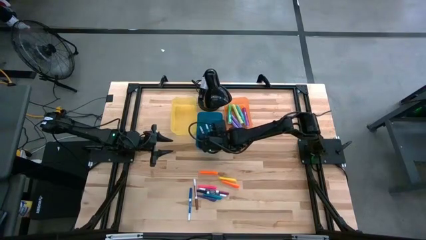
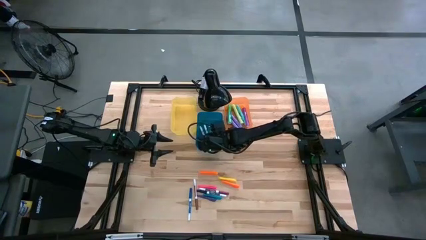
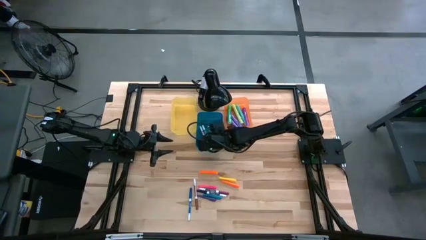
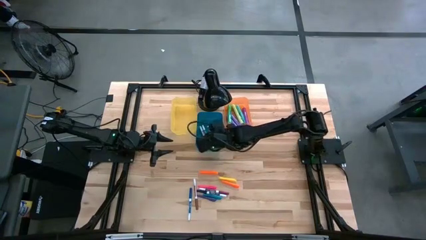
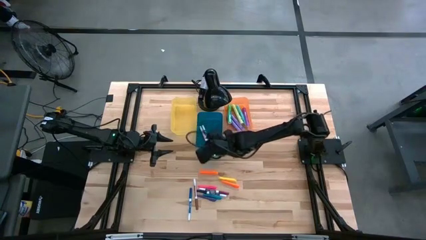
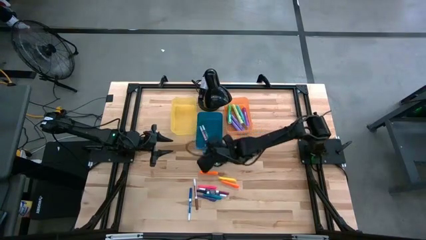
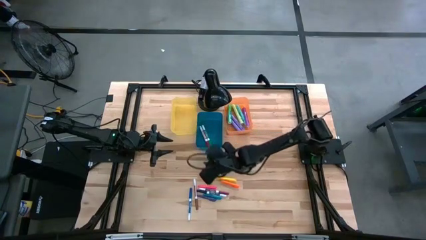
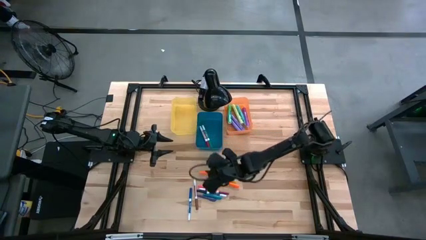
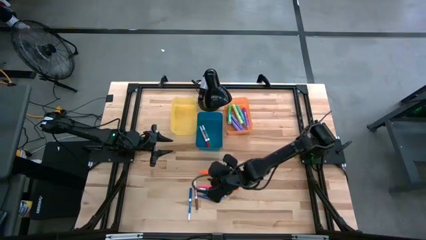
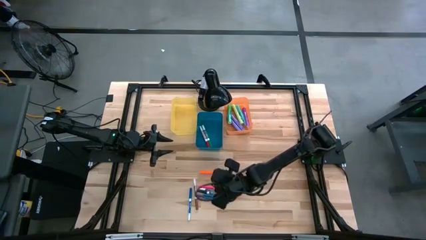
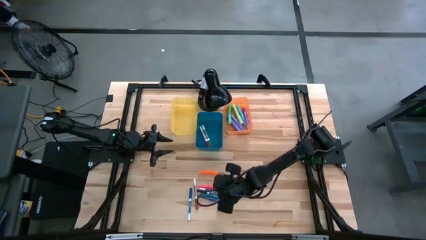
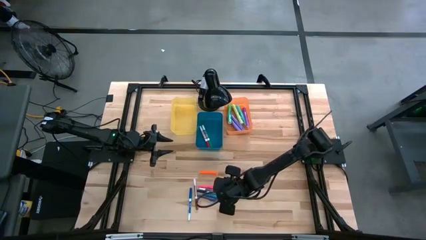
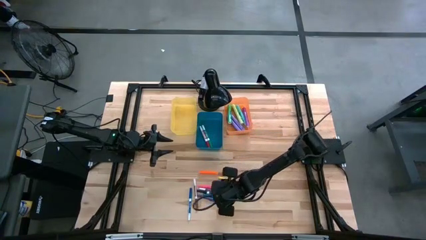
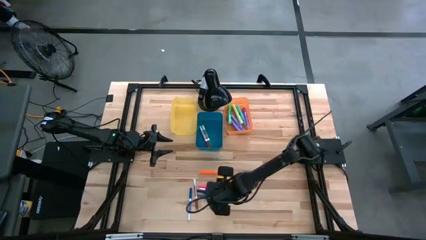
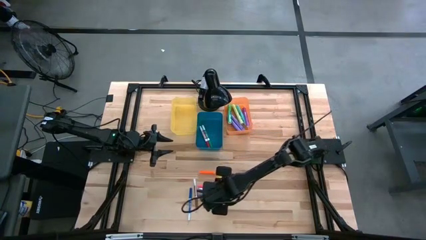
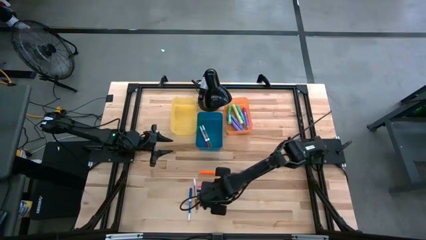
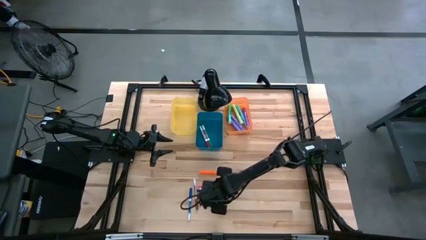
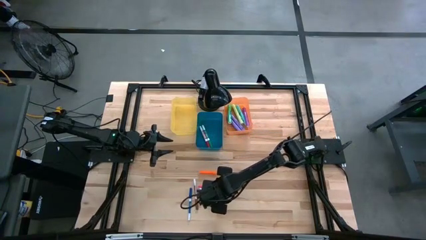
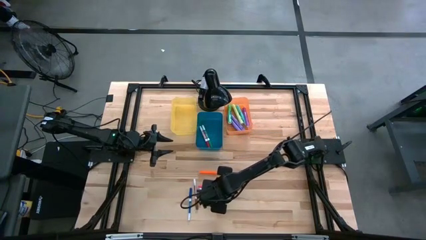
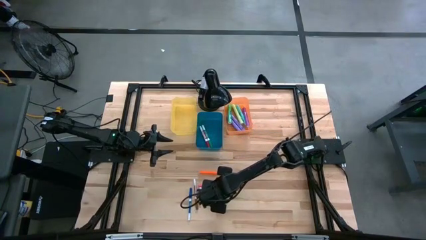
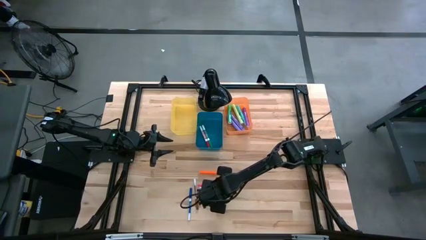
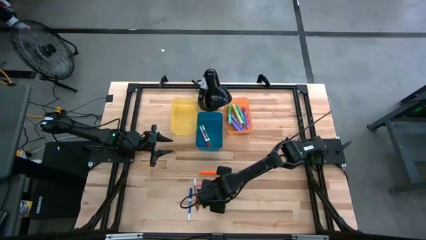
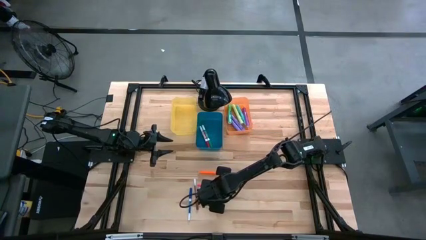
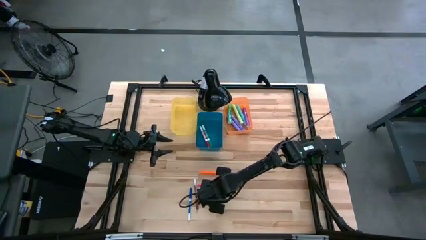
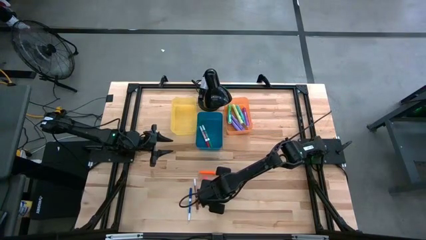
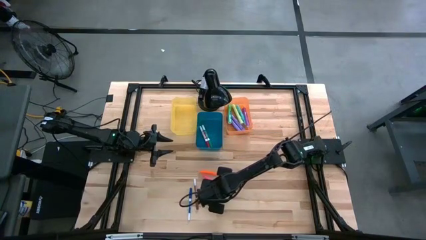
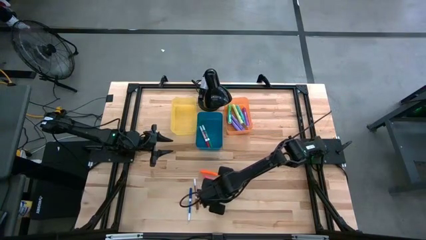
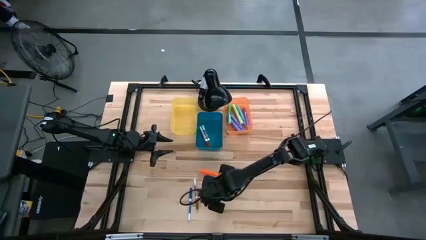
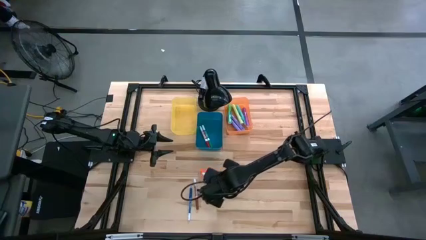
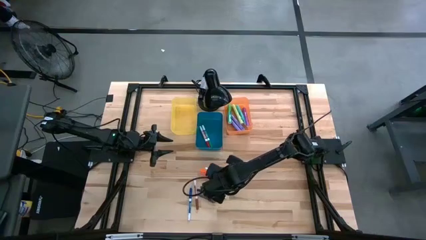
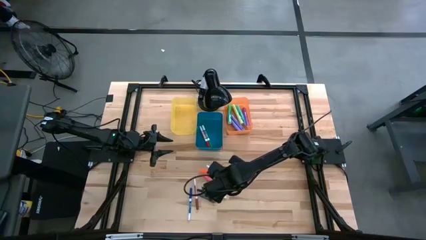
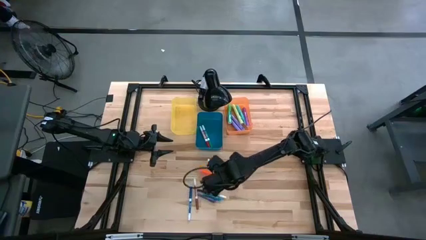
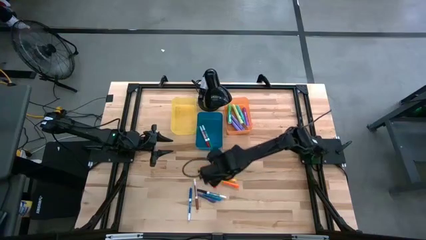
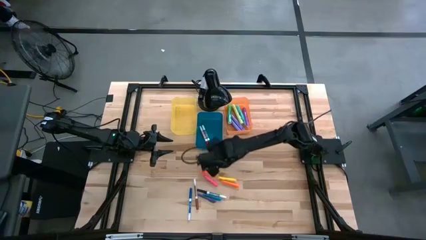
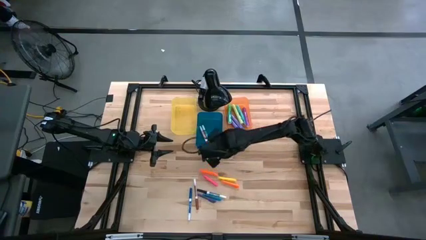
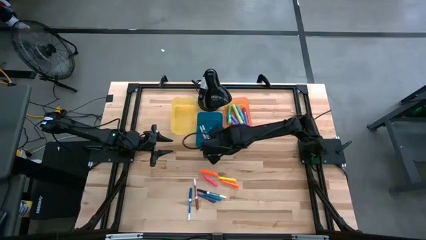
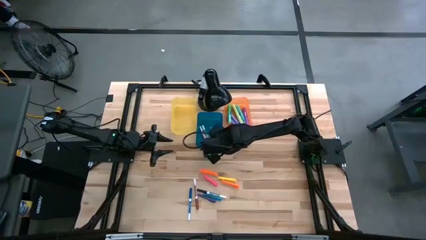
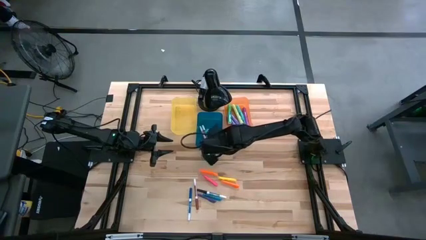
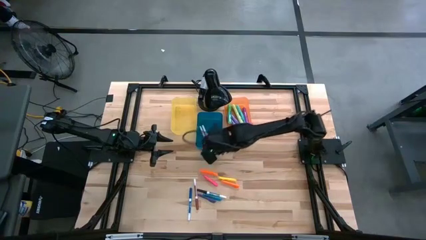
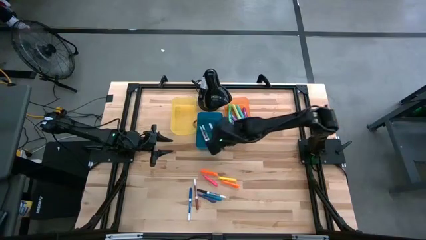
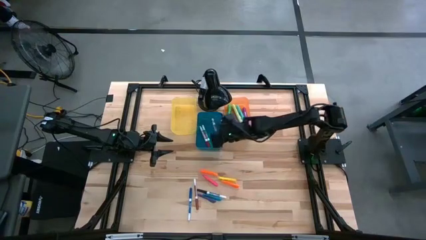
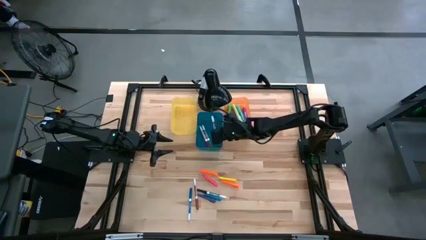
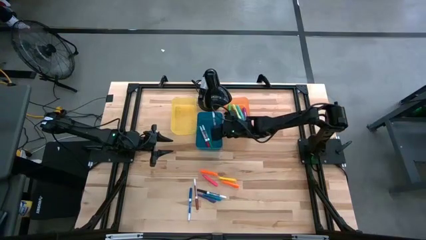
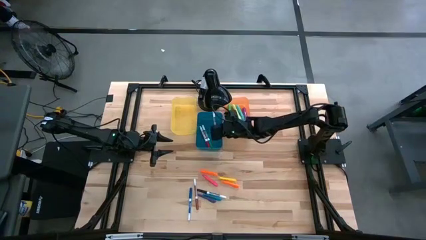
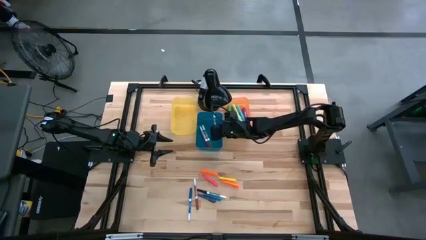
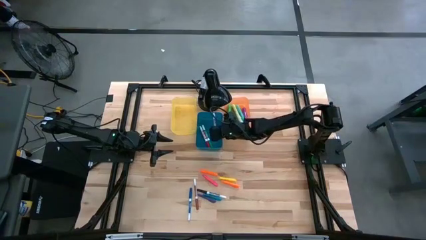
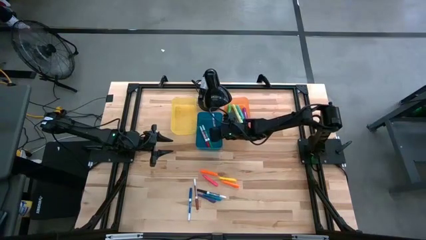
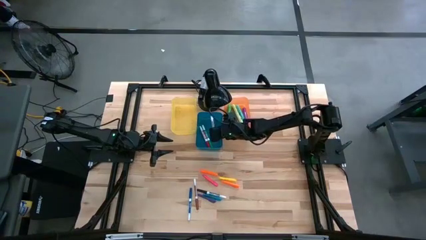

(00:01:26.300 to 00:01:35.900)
Task: Pick & Place Markers
Put the purple dry erase marker into the blue bin

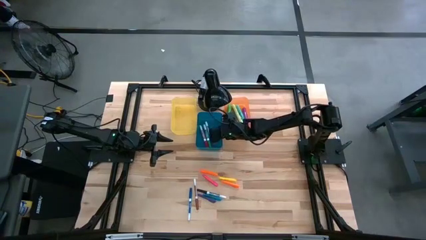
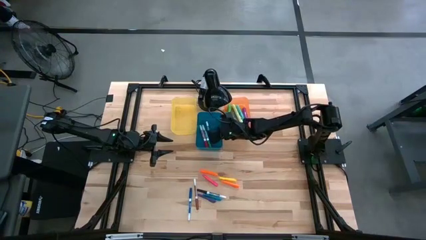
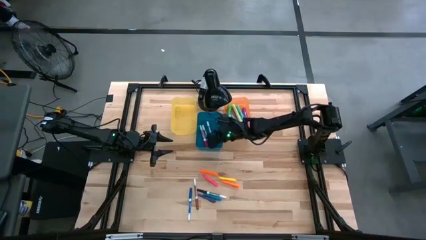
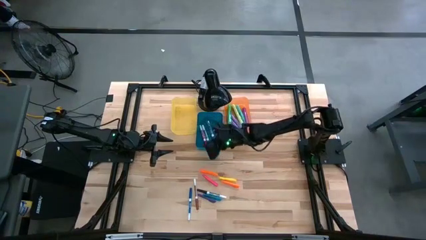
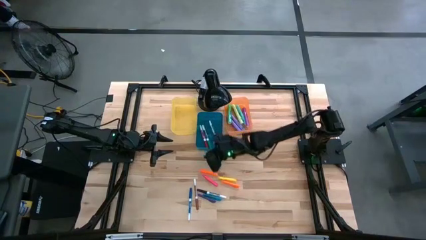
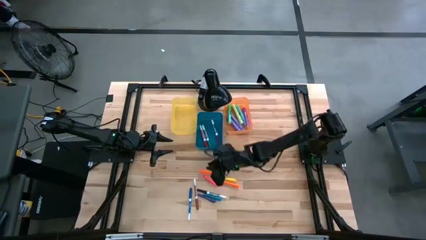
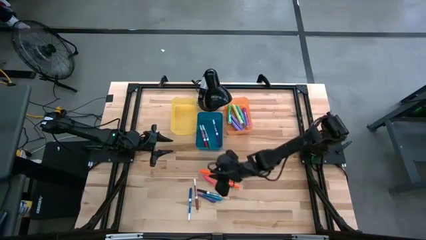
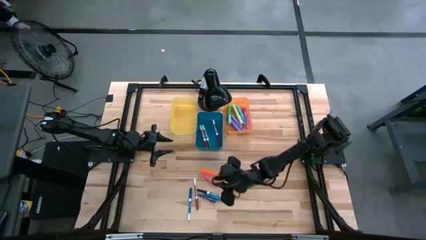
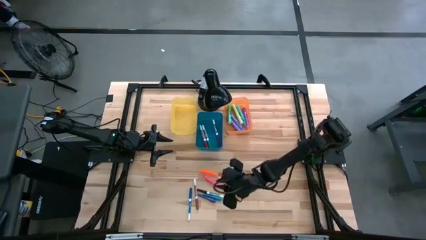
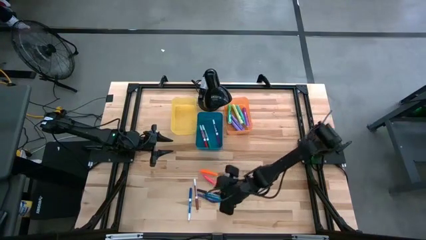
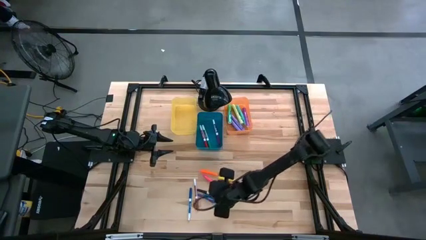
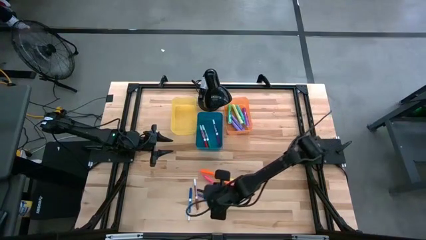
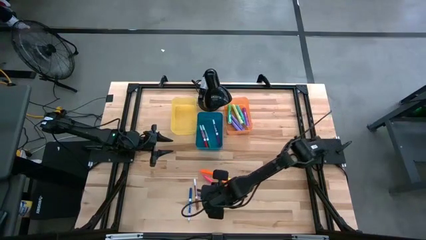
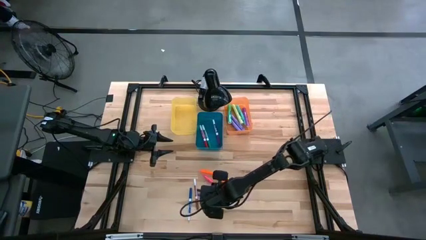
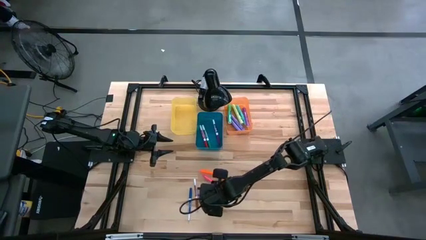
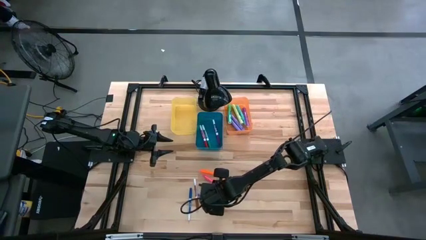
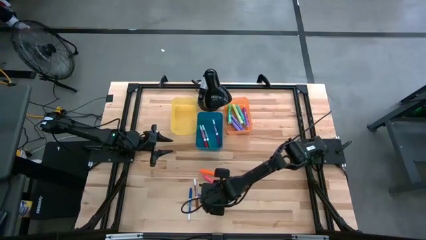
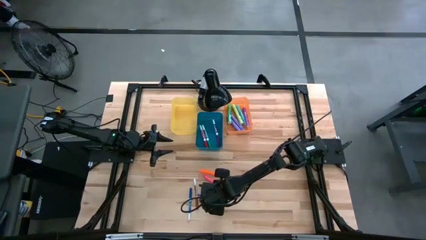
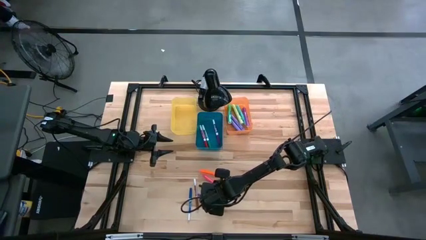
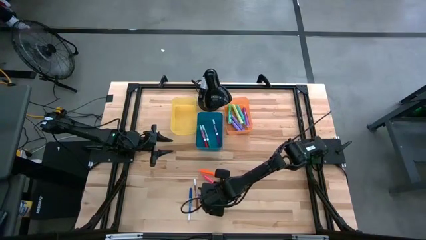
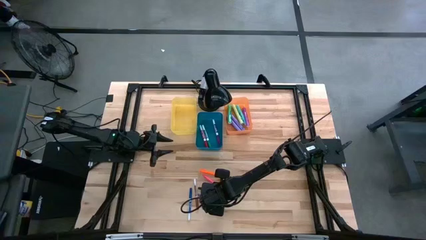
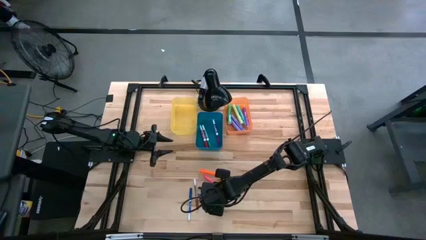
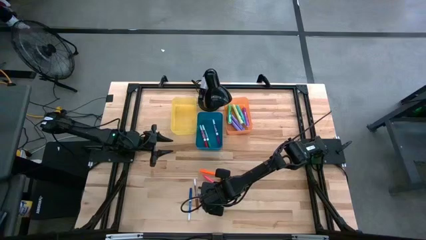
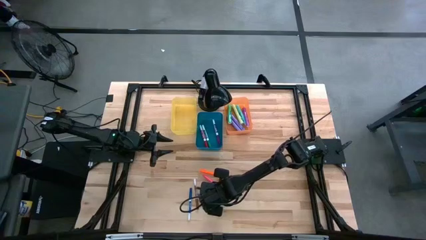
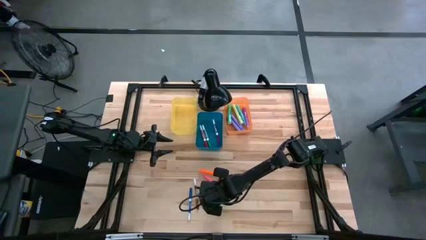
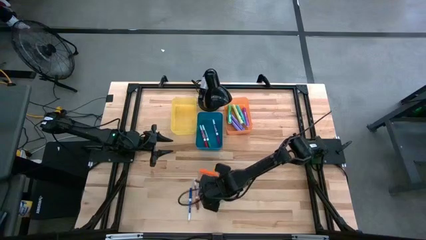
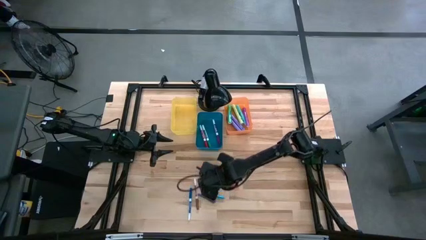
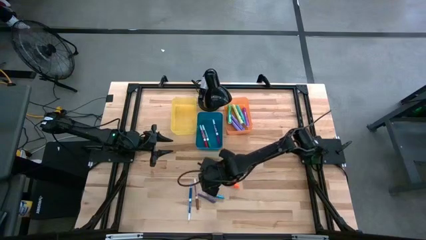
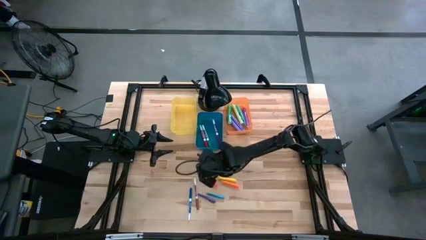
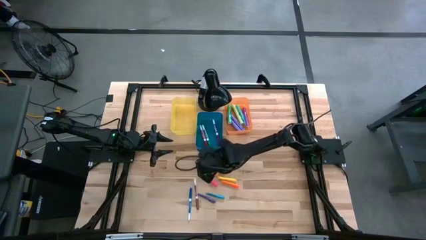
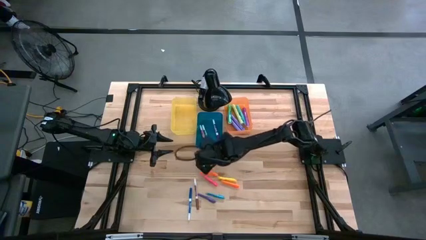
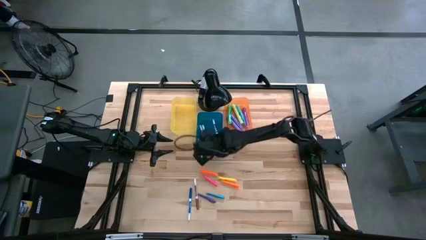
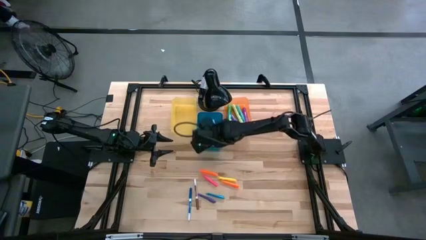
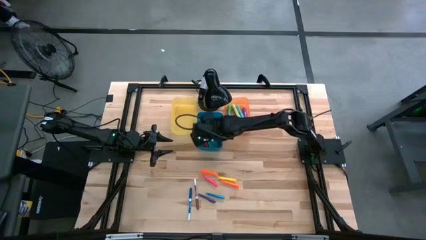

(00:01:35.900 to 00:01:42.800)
Put the black dry erase marker into the blue bin
